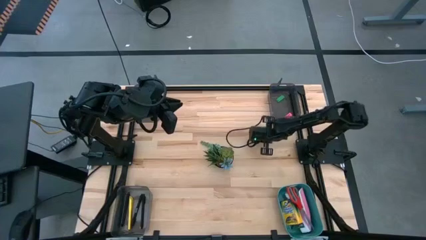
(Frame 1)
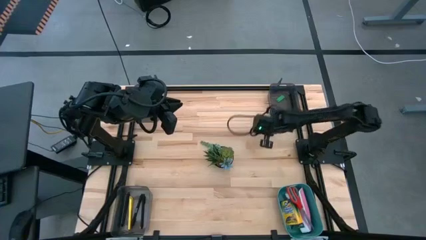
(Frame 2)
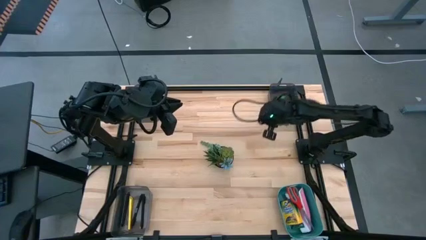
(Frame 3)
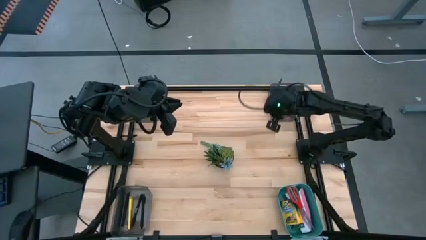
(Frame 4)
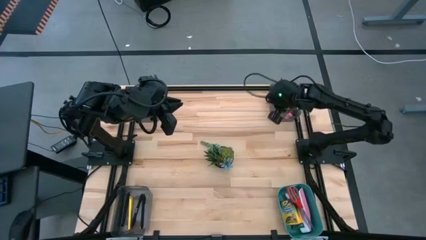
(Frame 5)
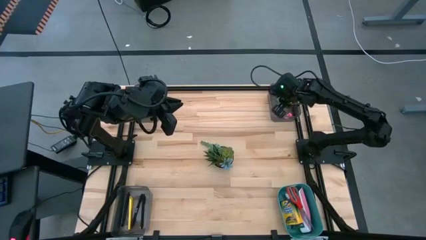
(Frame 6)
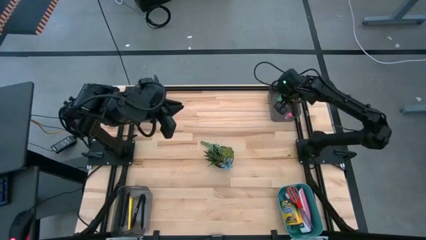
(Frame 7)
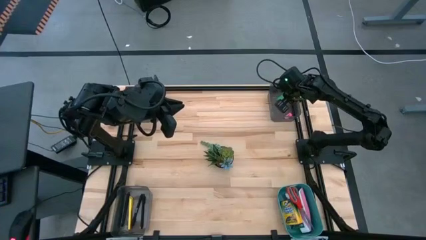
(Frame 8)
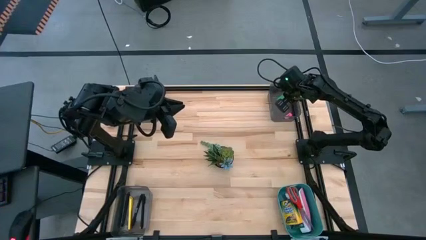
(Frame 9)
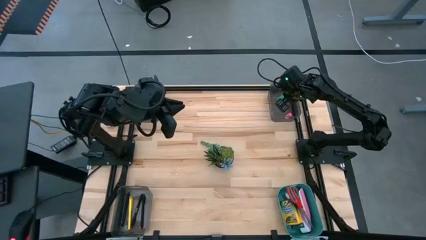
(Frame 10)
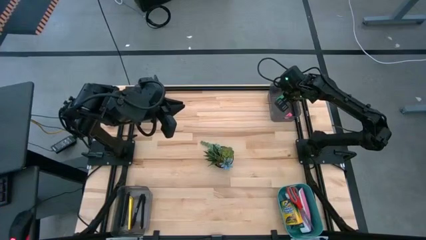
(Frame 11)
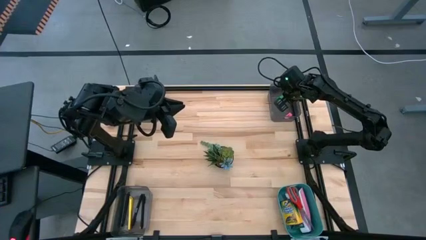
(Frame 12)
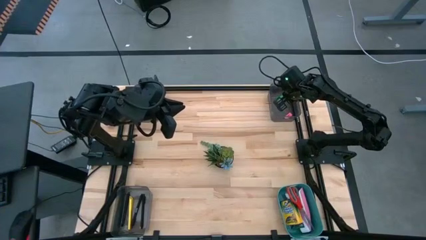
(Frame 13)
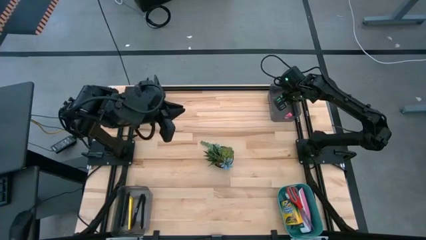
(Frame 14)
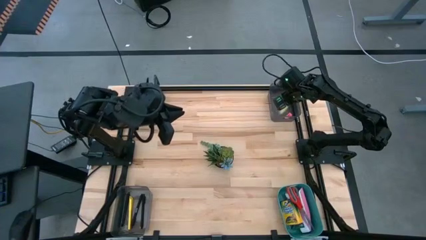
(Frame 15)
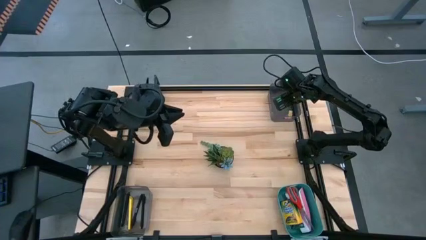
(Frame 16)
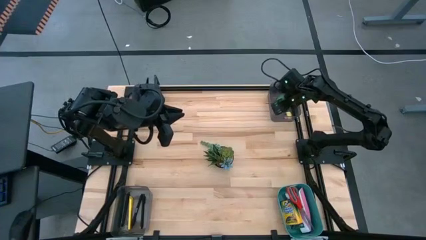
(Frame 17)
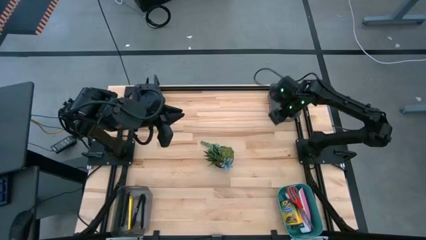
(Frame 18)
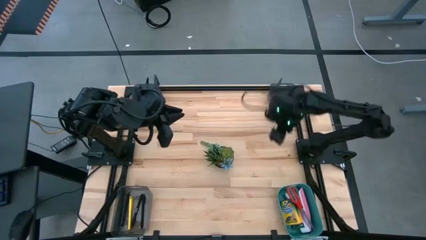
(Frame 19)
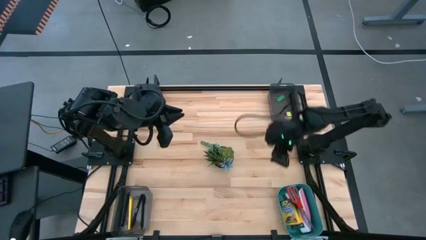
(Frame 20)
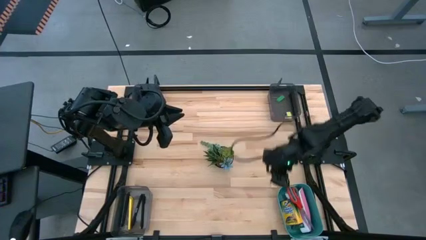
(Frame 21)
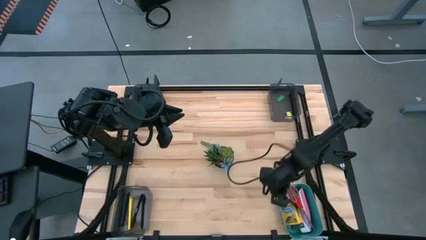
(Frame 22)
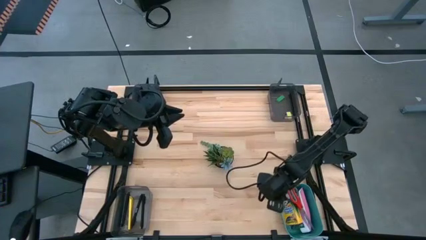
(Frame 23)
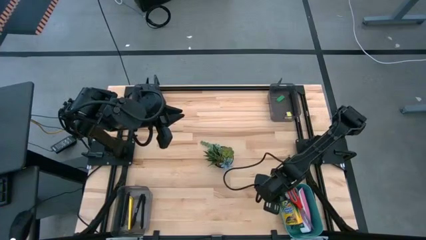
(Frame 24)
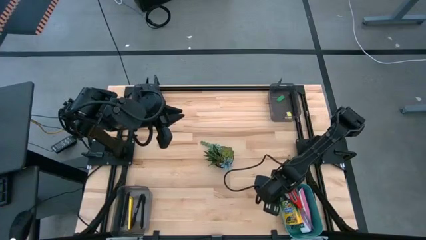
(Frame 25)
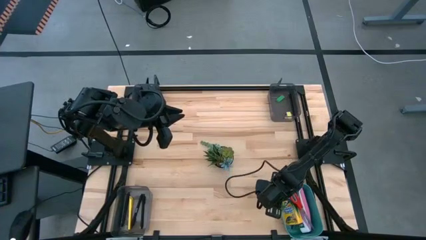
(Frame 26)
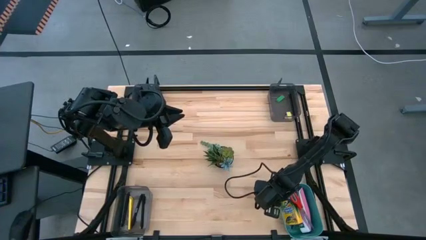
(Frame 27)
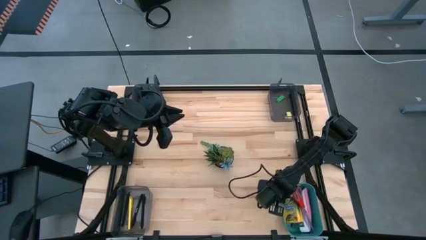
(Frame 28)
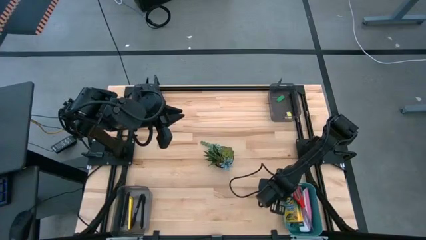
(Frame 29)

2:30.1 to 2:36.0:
Task: Sort crayons/erasers/pens/pencils in bins
Put the yellow eraser into the top right black bin

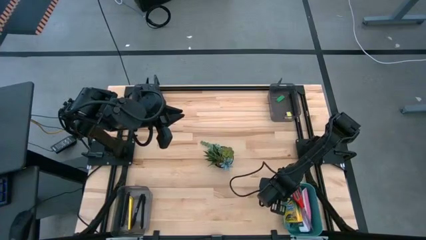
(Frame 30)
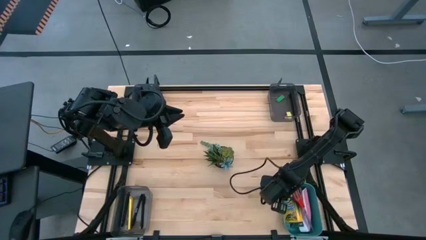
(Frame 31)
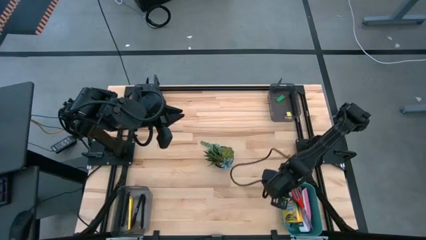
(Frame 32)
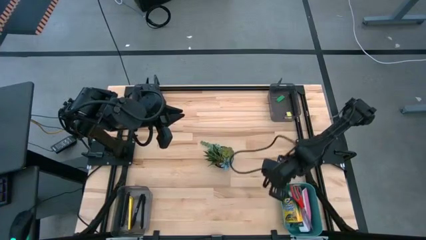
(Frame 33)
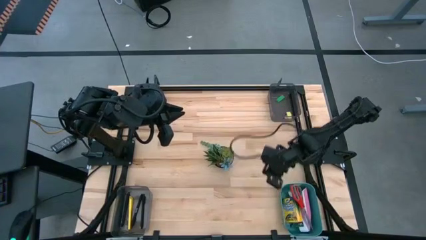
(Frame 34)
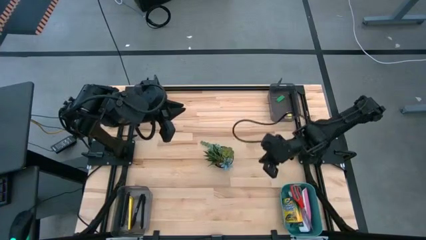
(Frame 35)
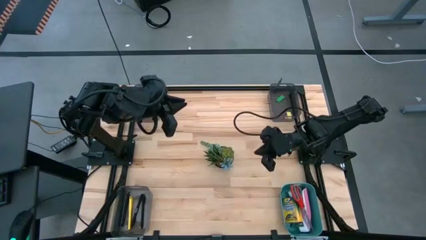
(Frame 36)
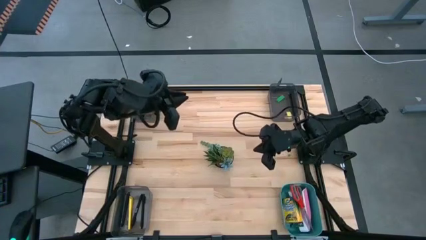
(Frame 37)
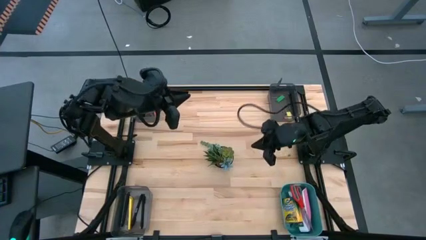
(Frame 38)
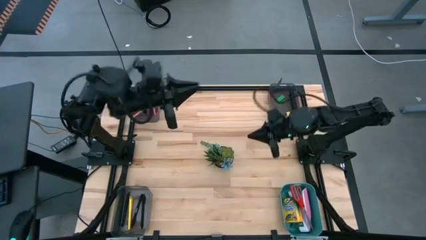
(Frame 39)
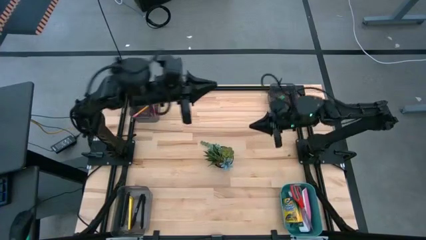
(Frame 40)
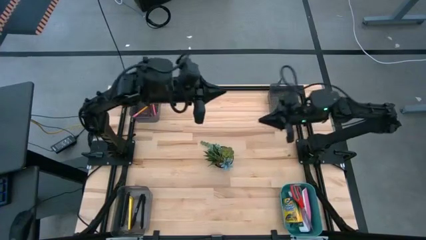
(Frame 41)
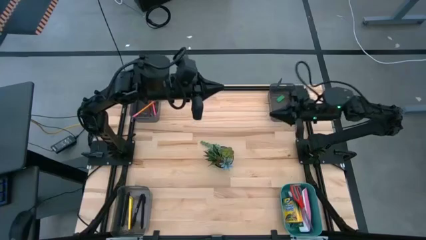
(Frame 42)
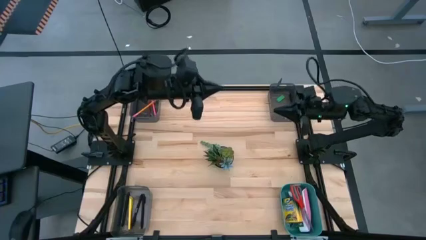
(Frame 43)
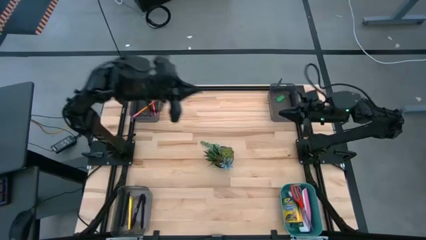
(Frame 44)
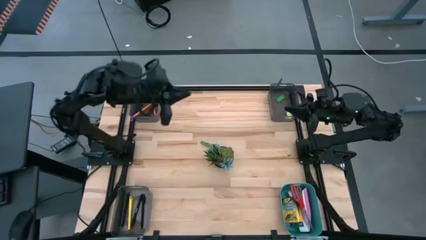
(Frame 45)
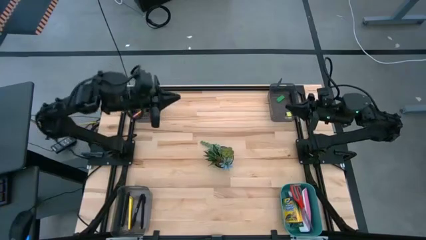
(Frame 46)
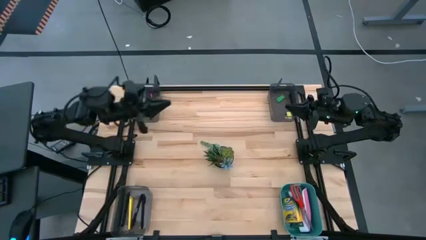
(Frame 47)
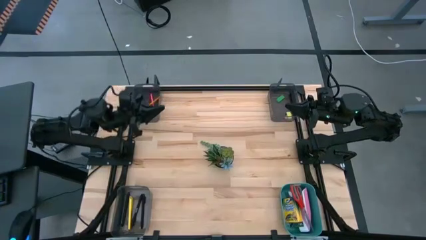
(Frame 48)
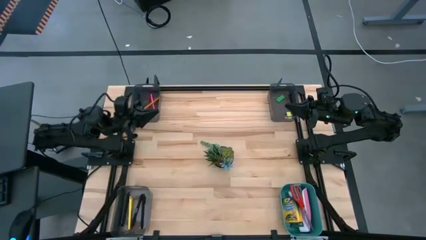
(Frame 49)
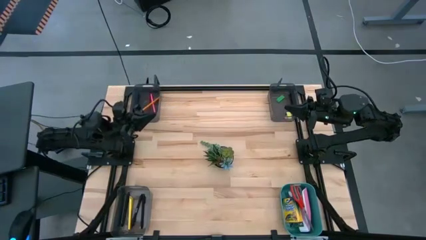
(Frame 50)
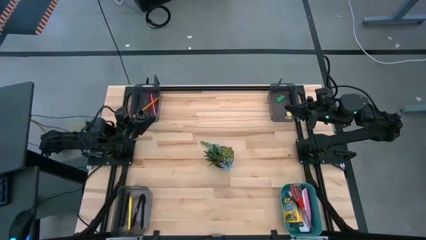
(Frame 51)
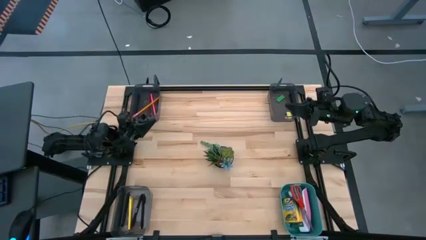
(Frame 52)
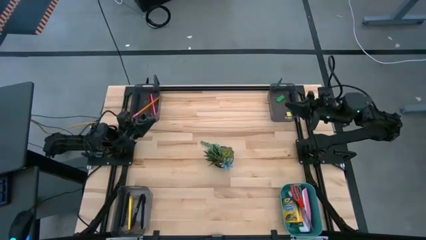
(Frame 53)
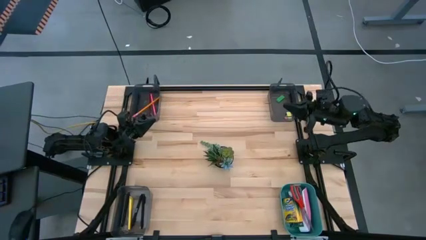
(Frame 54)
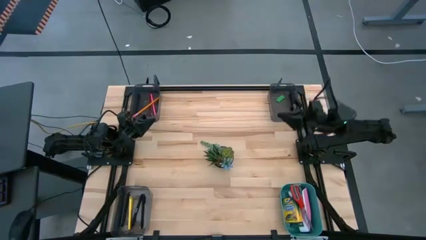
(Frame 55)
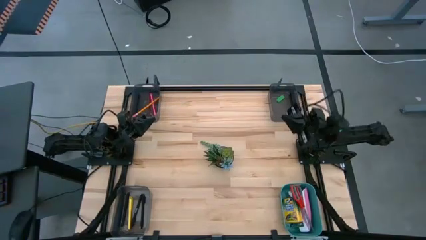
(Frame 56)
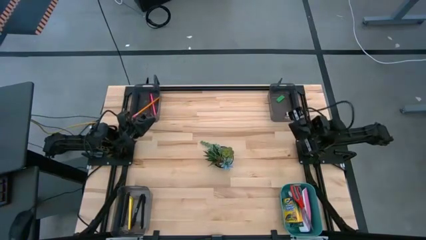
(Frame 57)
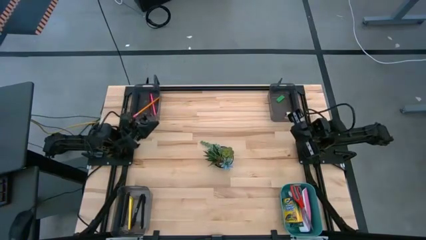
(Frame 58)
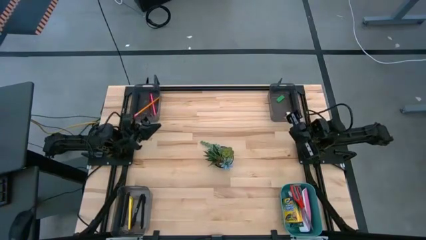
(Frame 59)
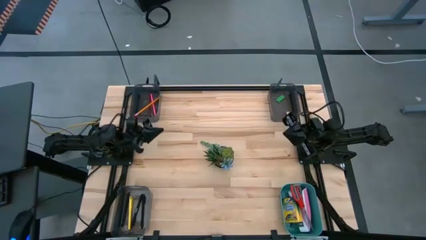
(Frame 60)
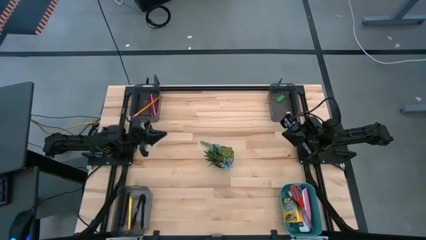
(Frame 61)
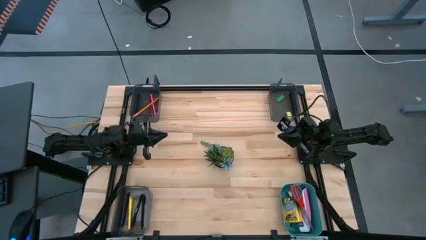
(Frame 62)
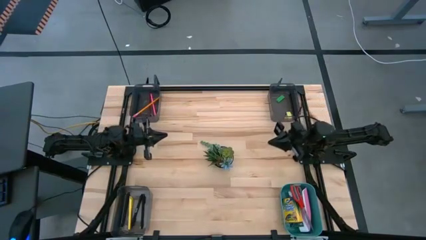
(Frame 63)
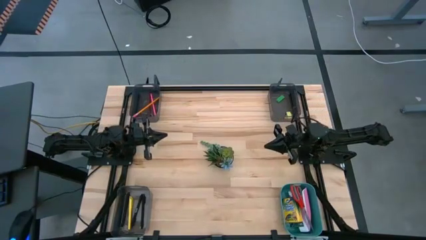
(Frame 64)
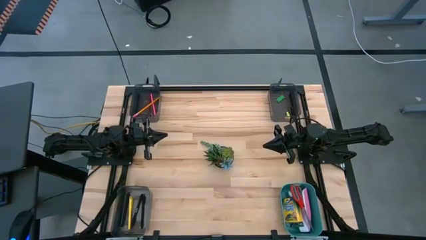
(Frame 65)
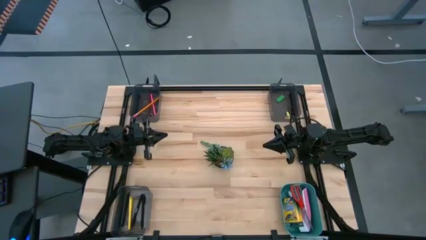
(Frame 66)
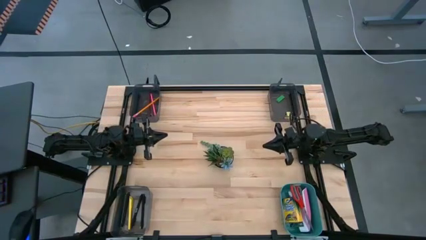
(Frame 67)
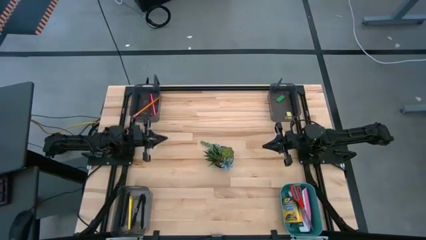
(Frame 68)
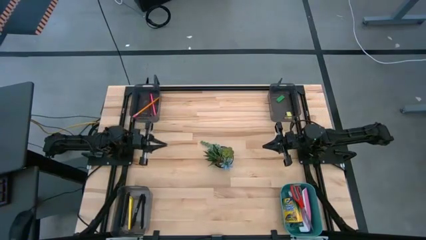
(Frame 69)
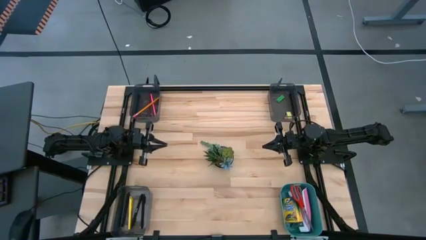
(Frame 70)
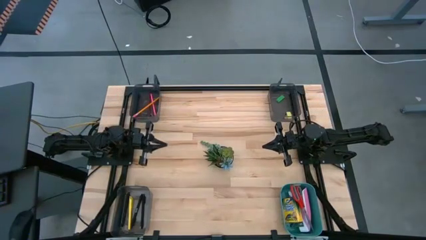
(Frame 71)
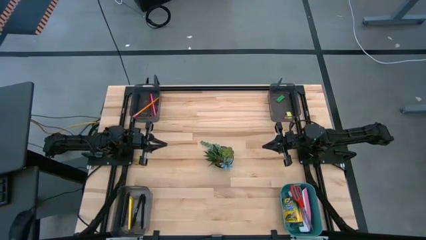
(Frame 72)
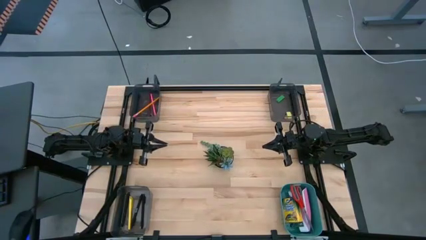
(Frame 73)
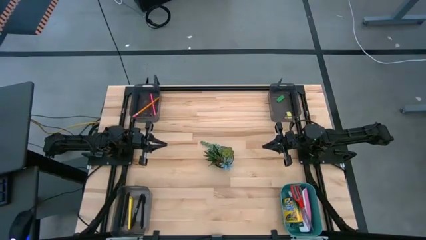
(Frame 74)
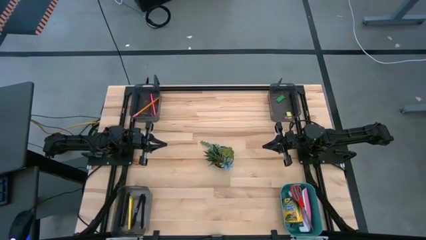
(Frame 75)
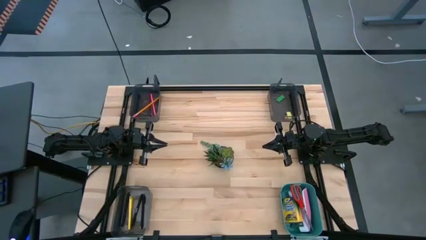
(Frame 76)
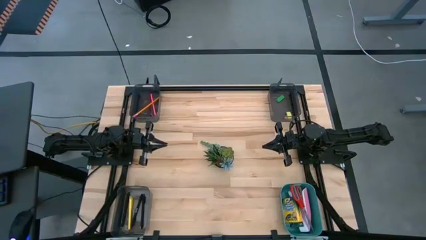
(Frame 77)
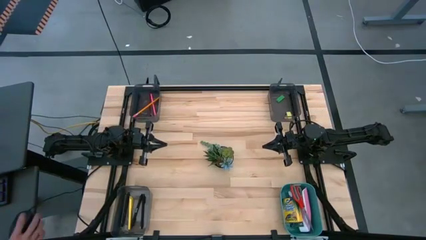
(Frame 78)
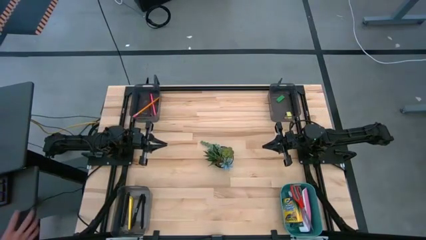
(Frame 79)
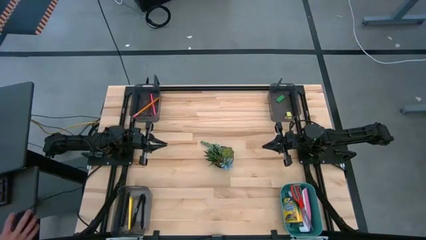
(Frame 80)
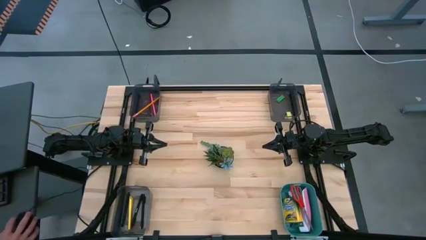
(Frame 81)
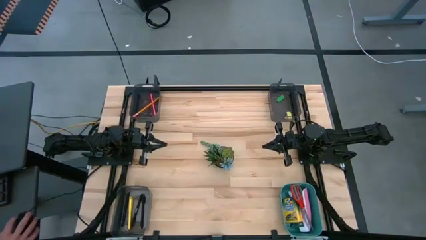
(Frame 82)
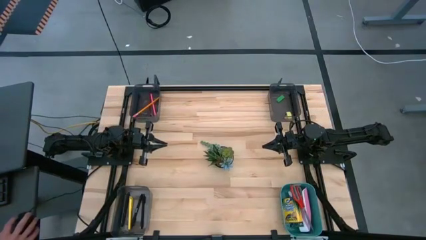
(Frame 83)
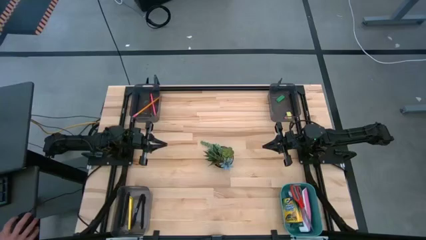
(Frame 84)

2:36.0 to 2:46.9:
Return to Home Position
